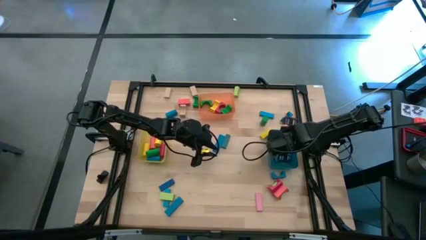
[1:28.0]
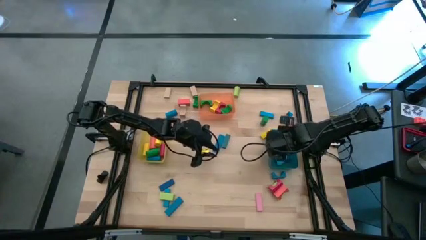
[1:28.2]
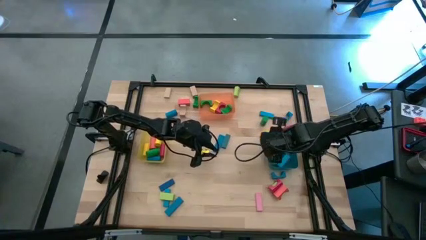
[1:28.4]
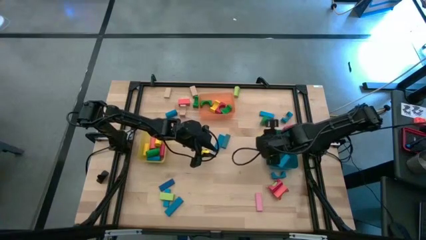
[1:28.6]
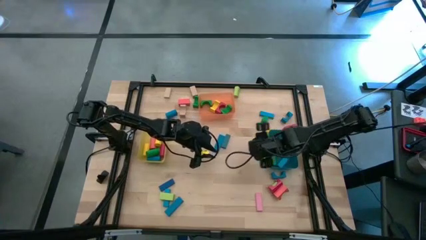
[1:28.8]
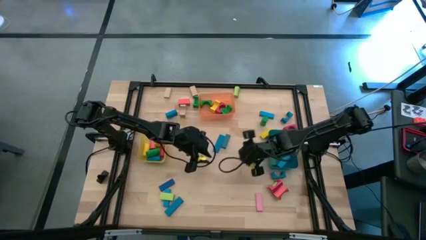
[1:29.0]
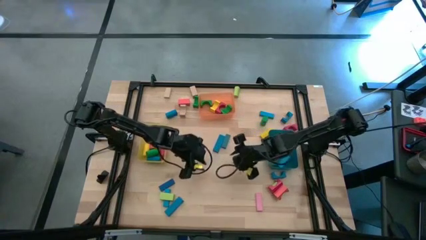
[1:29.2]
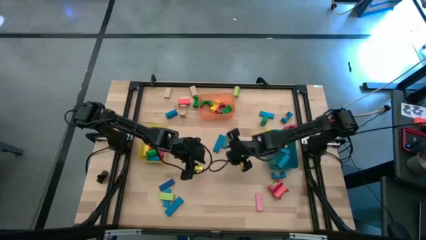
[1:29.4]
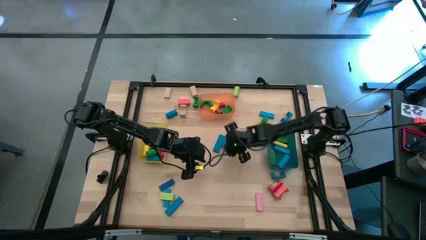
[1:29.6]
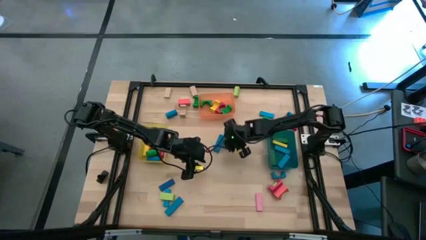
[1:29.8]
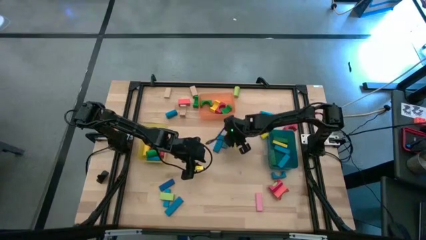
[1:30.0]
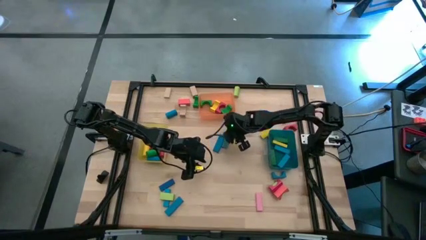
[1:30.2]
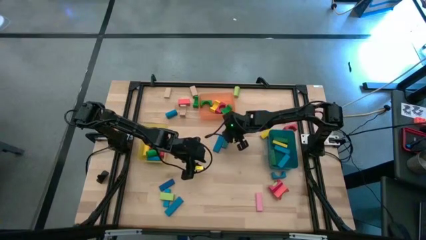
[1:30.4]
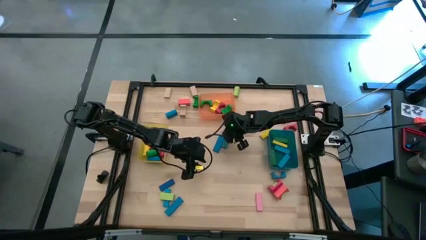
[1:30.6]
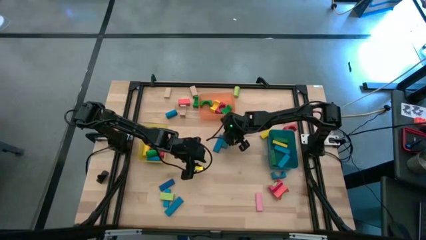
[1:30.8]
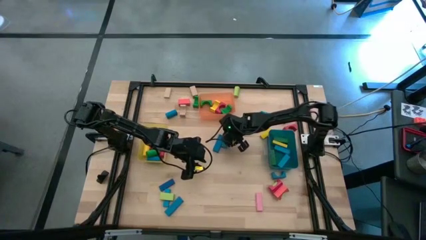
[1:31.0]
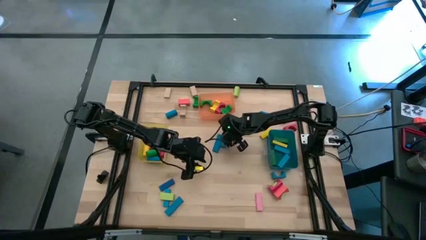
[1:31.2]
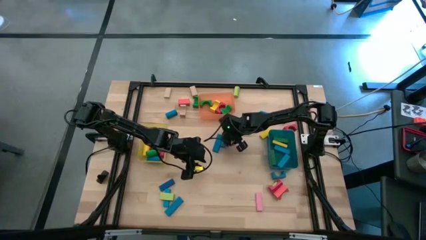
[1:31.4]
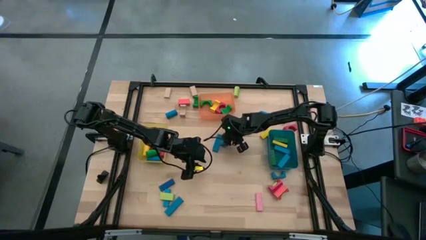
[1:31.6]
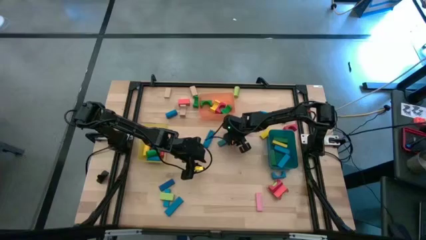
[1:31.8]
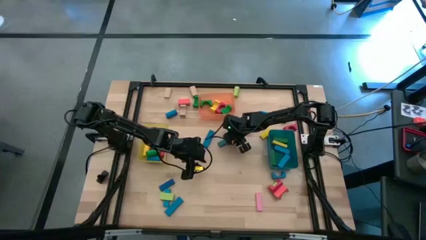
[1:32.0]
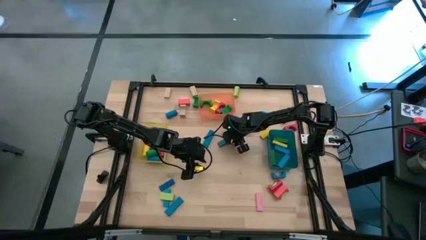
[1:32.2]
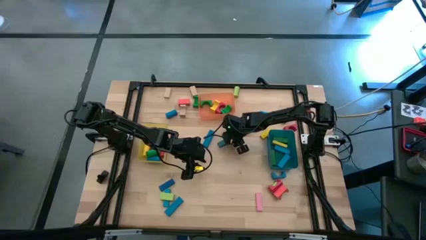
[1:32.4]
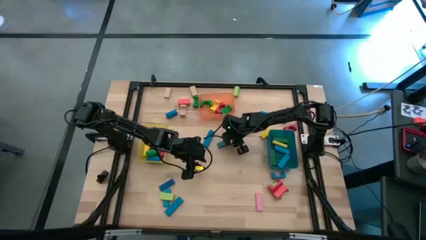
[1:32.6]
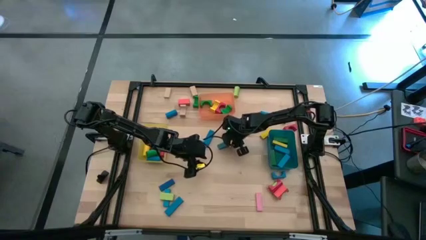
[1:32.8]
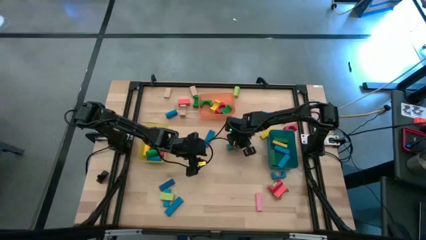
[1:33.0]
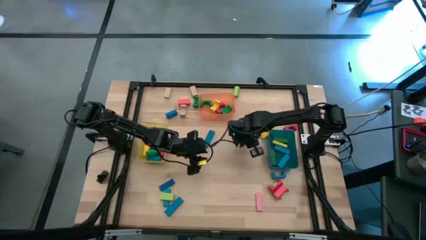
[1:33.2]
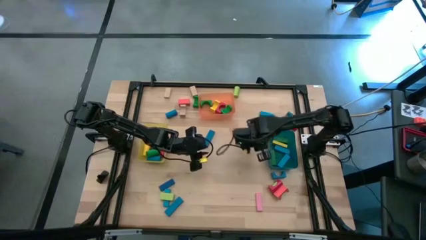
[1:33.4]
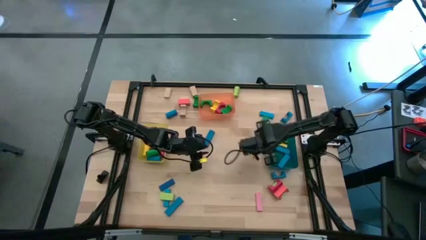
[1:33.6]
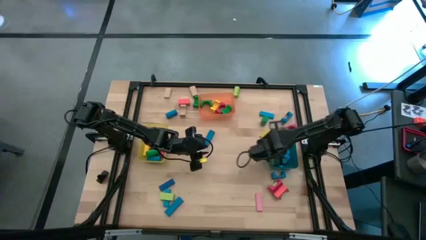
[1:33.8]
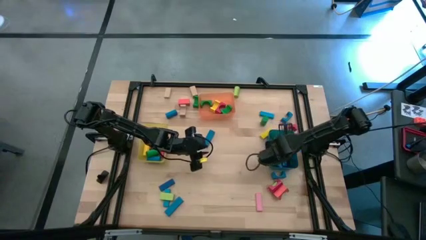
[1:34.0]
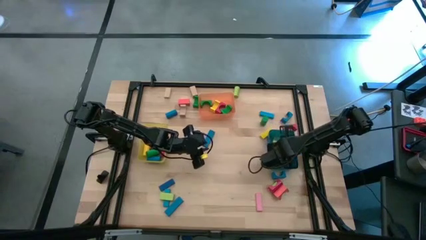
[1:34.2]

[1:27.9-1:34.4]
Task: Sort blocks by size
Put the blue rectangle block into the blue bin

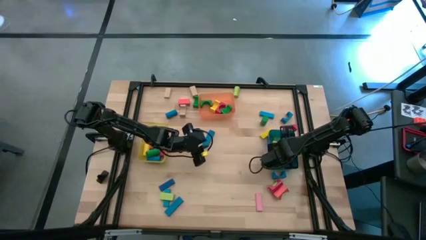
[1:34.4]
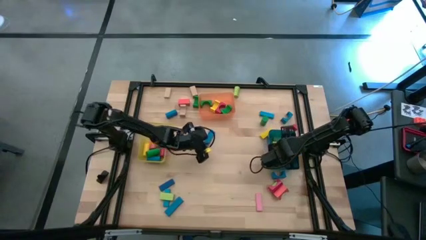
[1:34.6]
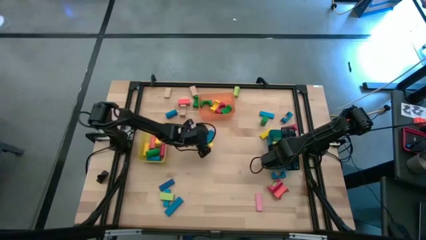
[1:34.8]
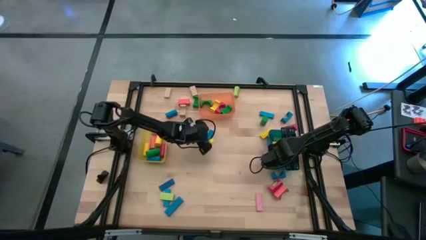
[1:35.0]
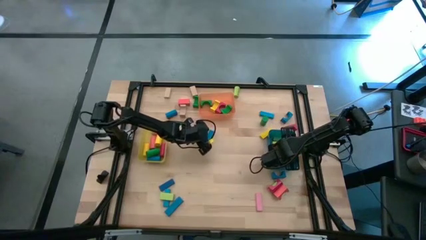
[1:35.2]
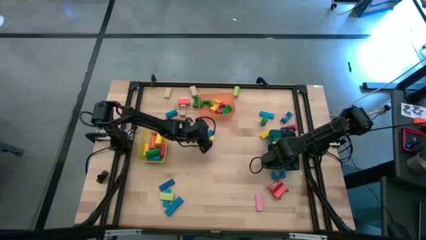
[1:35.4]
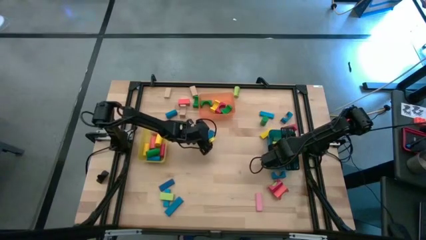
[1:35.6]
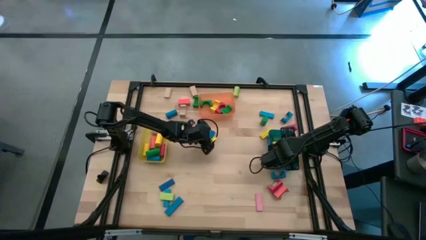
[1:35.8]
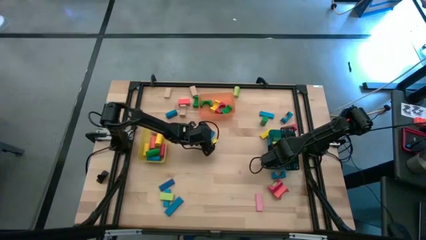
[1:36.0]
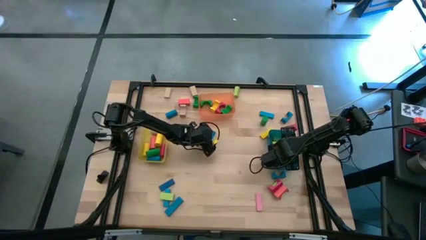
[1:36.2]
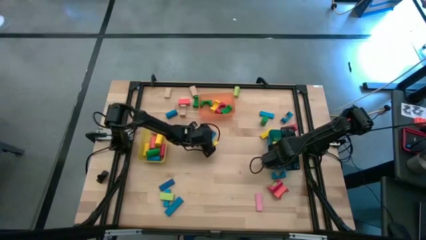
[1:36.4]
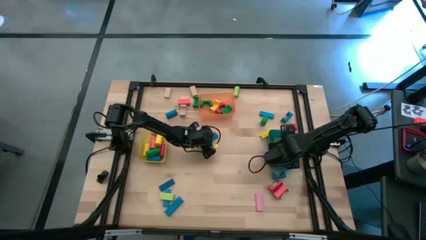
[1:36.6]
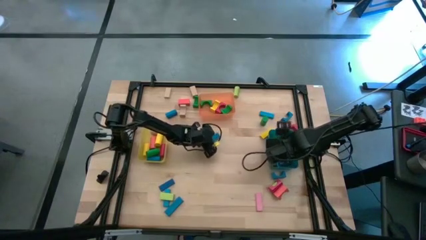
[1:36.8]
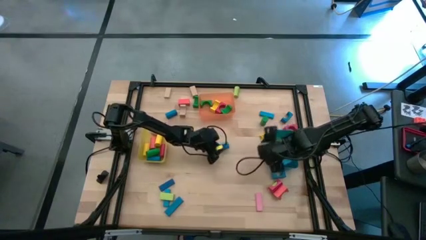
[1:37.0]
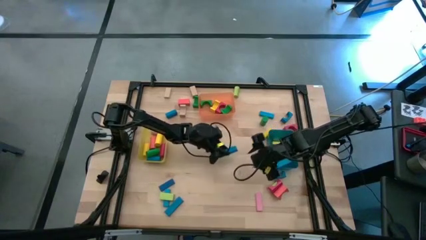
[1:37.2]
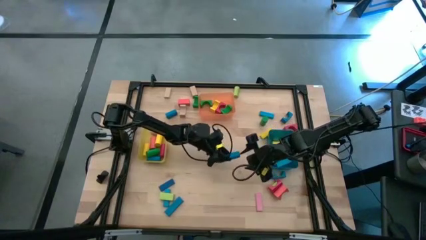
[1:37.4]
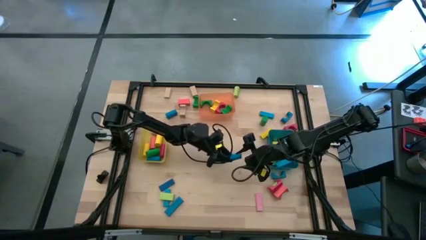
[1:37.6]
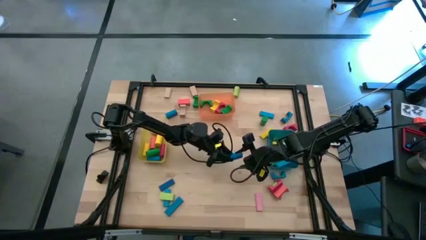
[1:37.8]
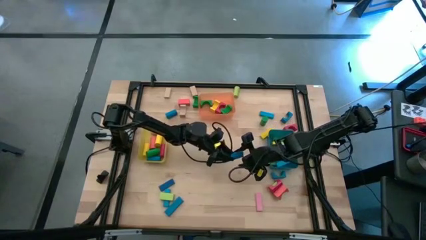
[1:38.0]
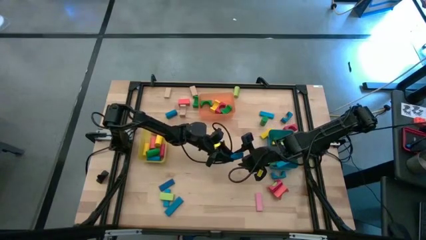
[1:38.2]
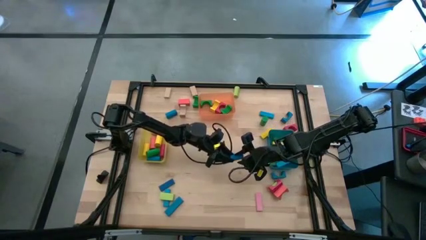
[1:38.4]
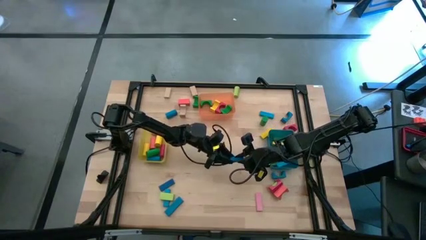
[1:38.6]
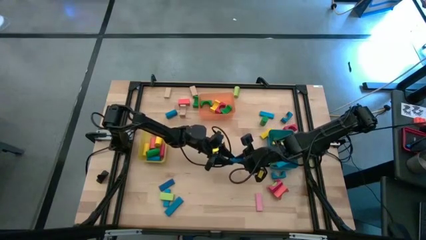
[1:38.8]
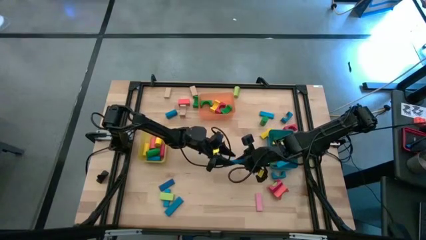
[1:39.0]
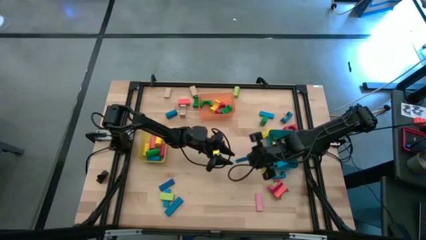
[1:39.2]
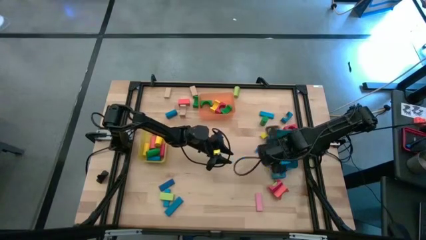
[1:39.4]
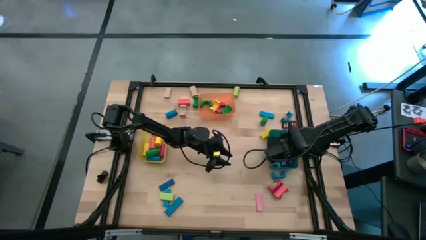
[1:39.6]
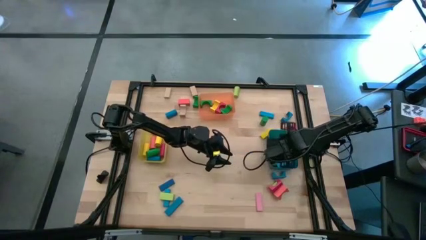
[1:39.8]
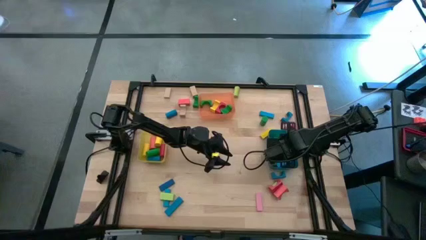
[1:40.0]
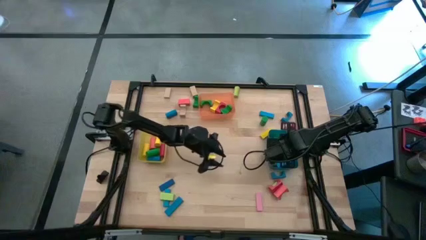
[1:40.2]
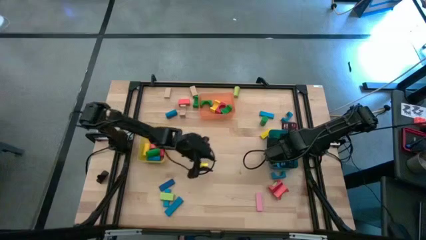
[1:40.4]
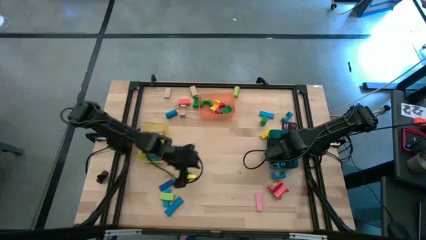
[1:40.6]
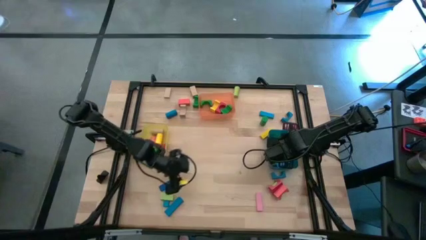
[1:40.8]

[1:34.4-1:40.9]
Put the blue rectangle block into the blue bin

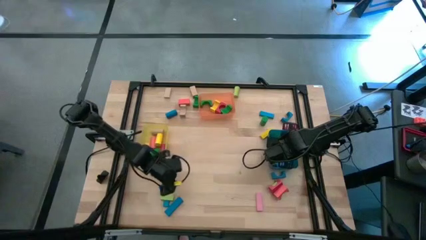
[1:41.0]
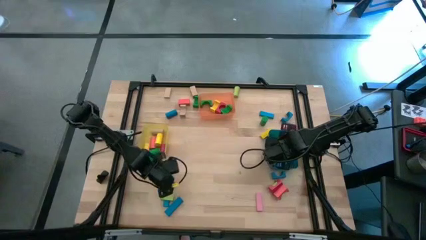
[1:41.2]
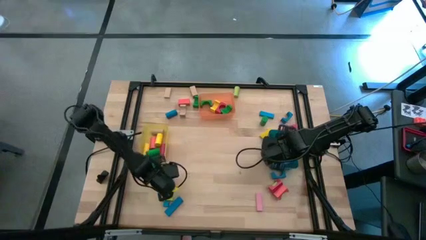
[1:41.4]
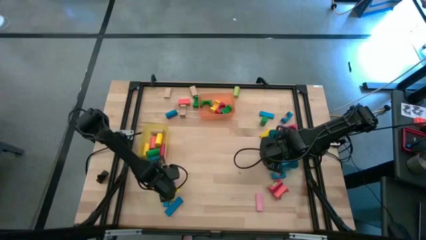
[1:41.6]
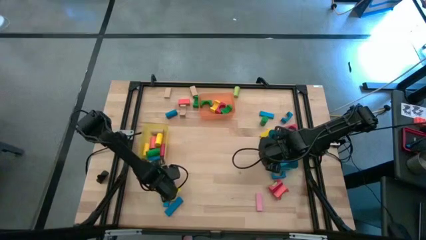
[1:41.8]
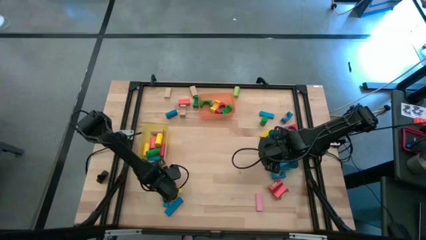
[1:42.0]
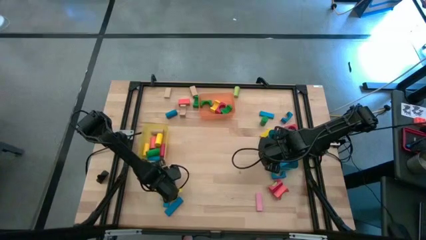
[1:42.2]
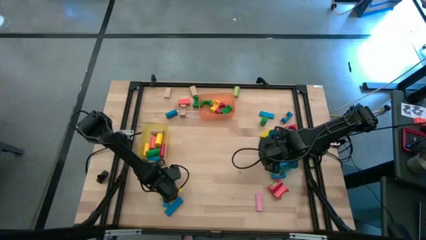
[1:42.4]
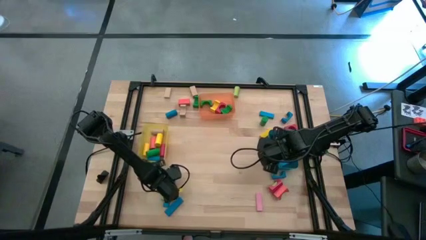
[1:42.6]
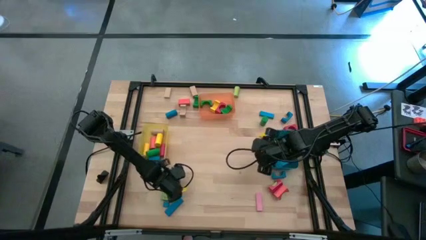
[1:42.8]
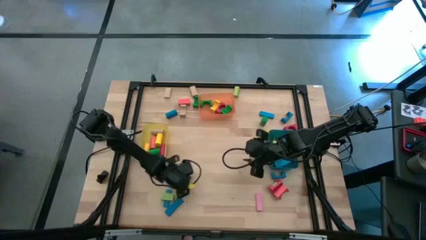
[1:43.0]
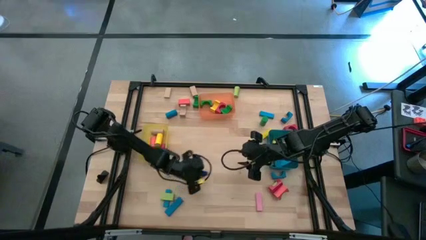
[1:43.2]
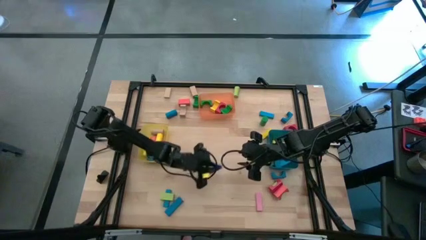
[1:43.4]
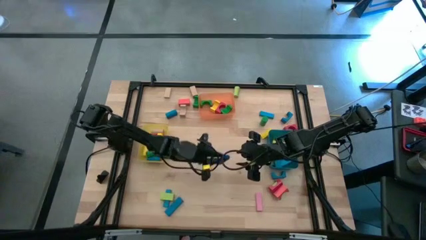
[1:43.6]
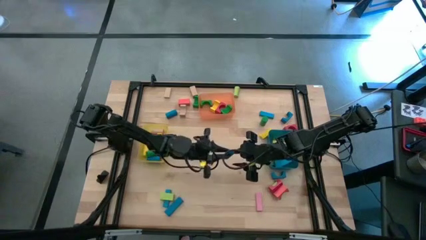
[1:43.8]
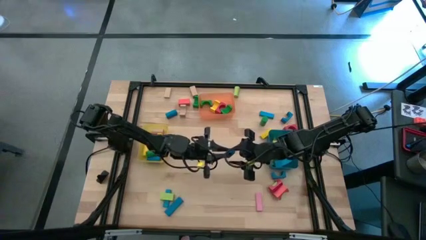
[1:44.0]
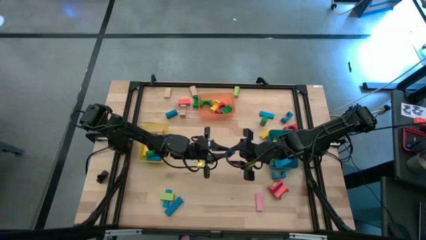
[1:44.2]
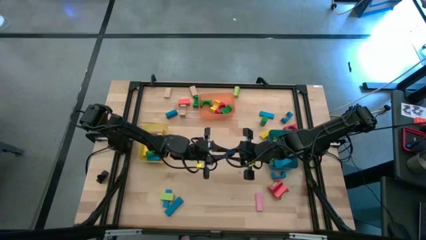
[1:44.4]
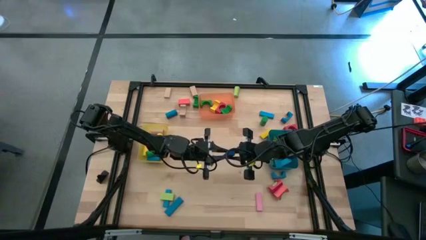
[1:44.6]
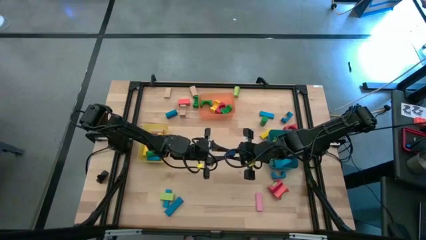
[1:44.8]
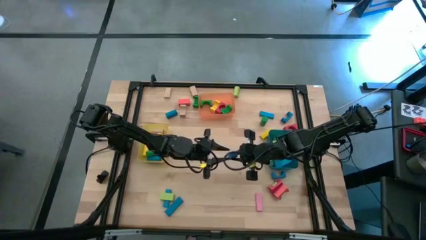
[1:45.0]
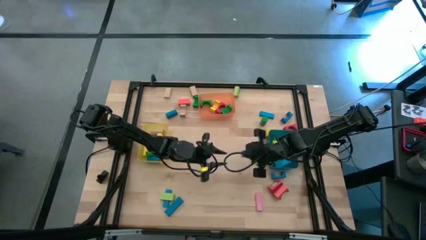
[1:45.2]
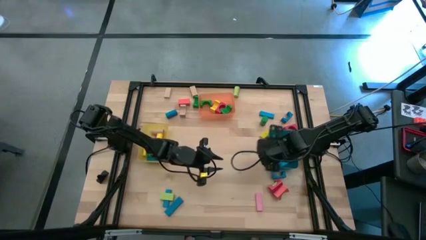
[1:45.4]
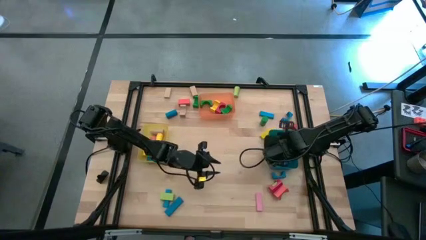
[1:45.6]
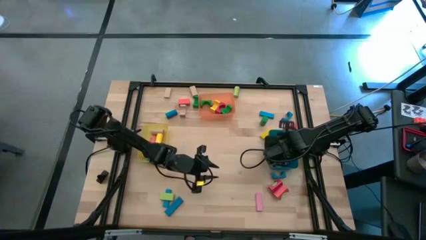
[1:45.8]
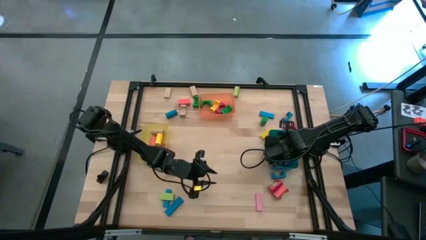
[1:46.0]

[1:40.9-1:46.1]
Put the blue rectangle block into the blue bin
